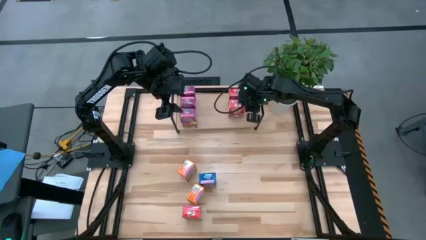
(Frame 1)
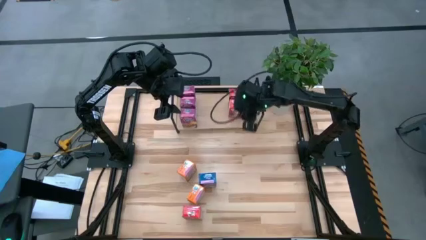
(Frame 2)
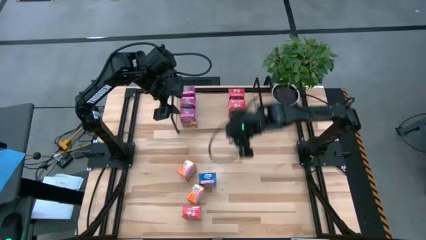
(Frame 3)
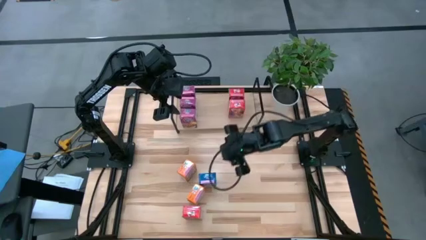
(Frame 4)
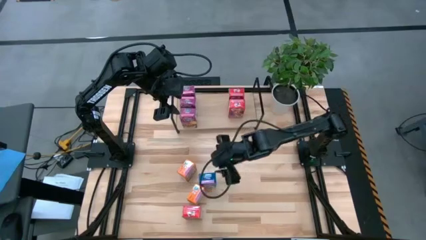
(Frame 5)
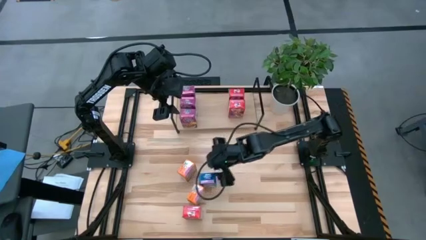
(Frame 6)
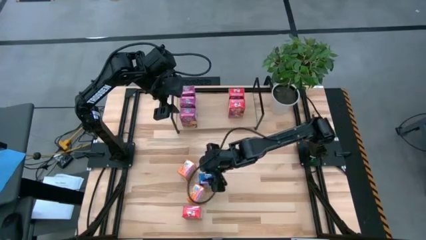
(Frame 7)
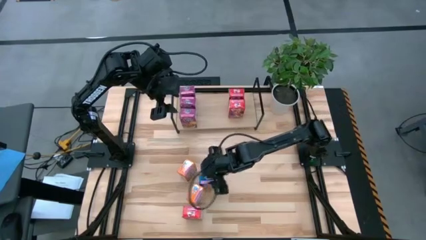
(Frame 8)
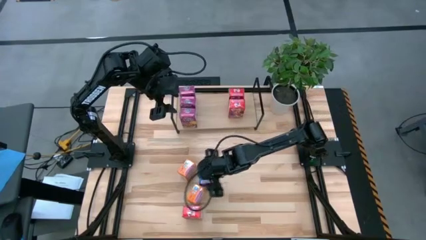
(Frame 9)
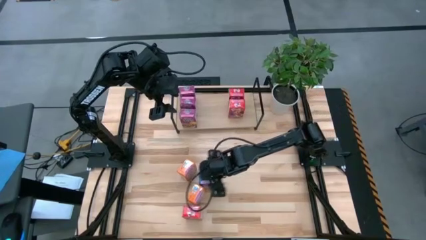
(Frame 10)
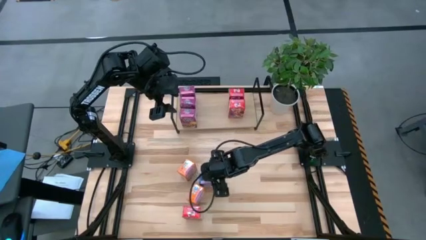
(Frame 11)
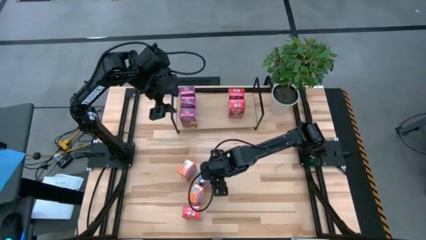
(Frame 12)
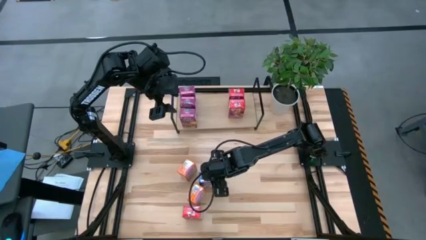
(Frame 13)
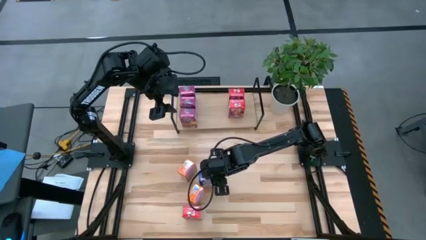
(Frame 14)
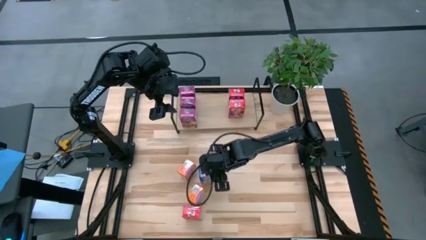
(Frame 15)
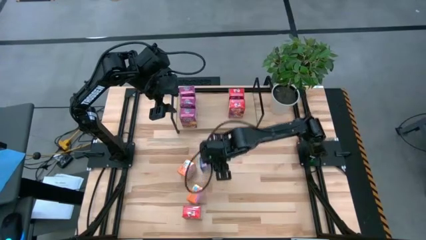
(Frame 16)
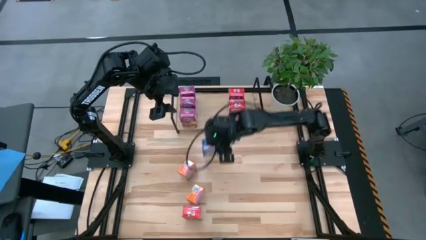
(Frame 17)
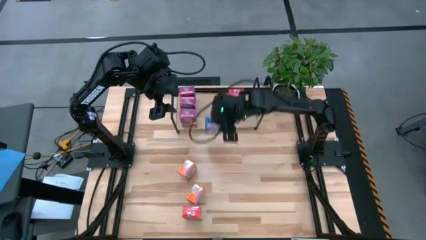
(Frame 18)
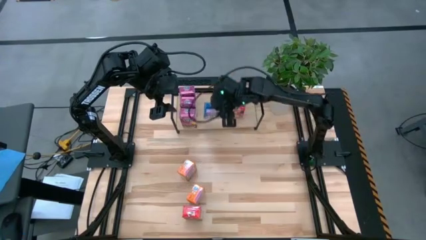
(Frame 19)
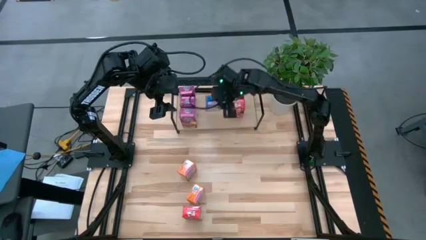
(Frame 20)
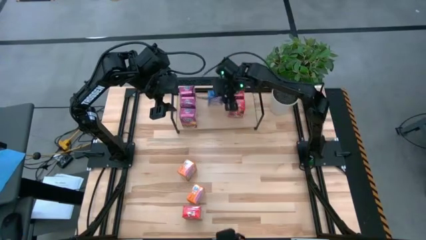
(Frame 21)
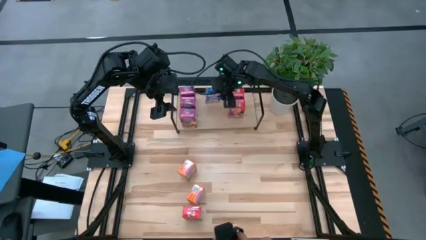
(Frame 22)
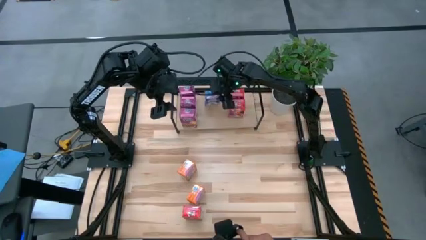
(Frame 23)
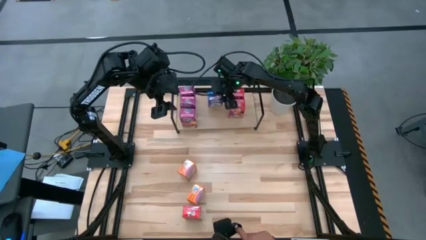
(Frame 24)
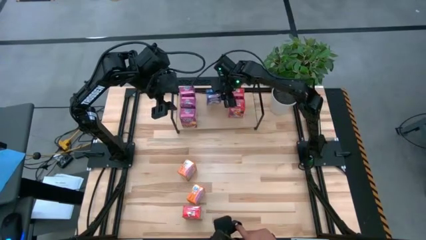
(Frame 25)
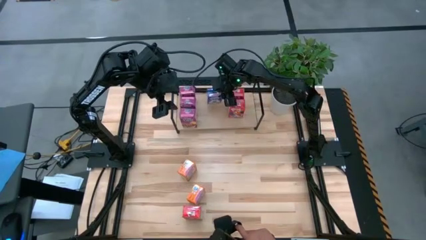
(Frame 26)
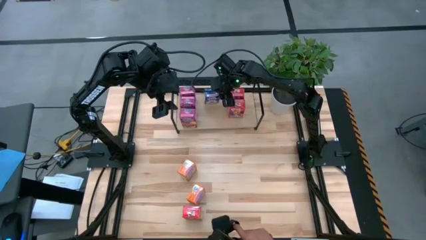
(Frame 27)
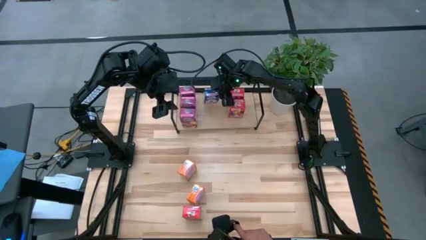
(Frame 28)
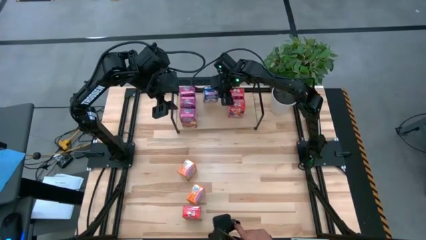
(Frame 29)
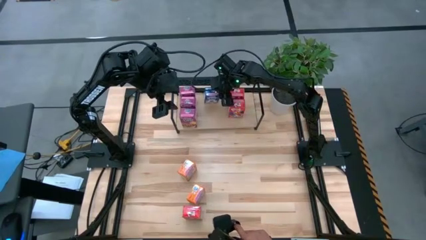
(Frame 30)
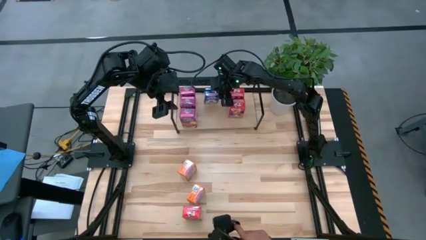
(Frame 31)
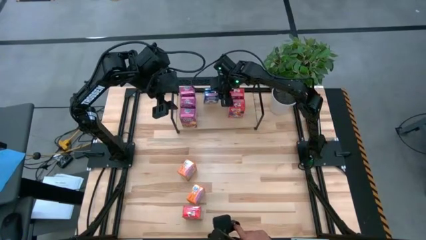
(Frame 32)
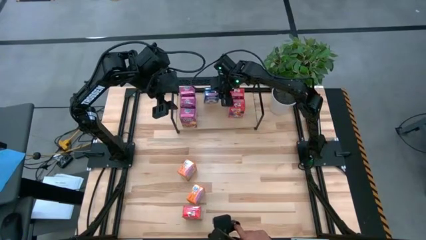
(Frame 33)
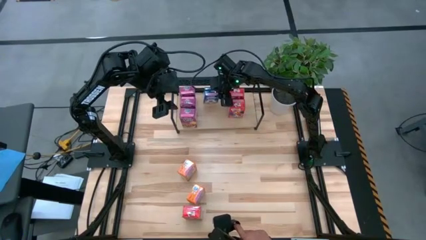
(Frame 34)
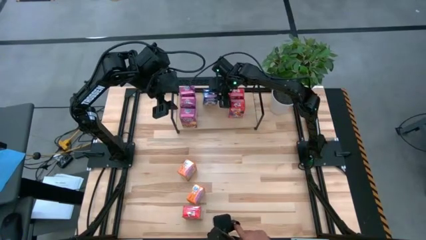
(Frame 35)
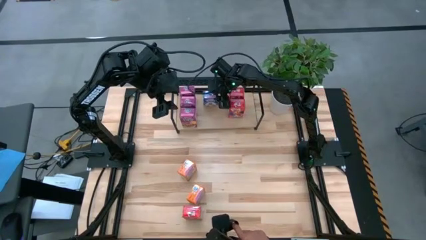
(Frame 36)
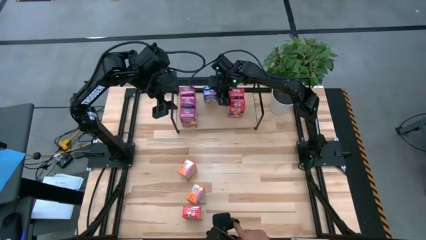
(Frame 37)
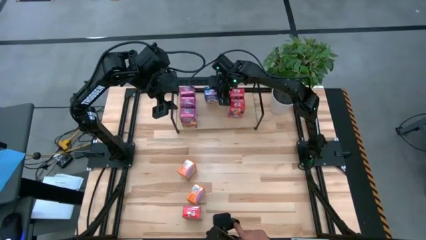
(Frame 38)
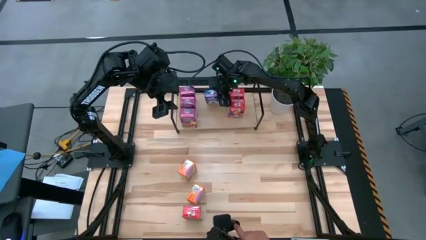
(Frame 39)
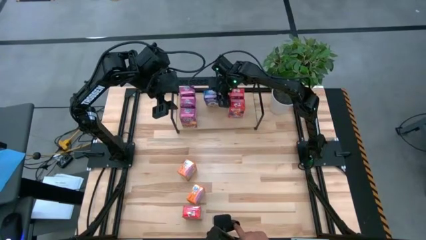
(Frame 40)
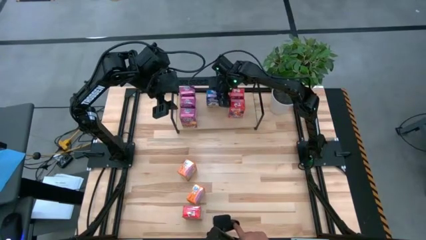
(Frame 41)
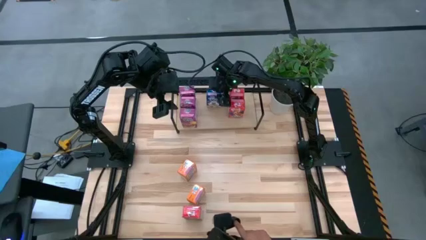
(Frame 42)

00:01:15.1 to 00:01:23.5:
Task: Stack cereal on shelf
Put the blue cereal box on the shelf

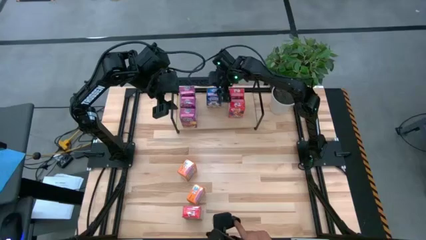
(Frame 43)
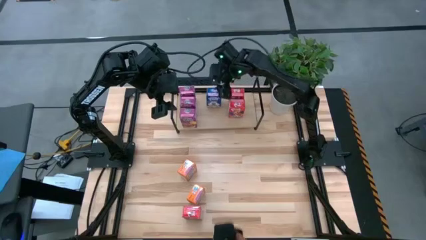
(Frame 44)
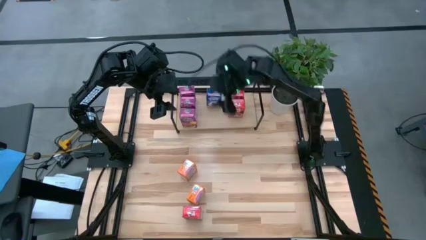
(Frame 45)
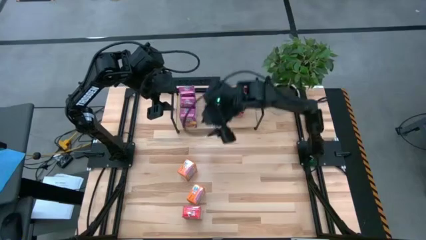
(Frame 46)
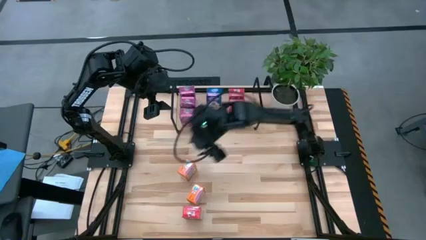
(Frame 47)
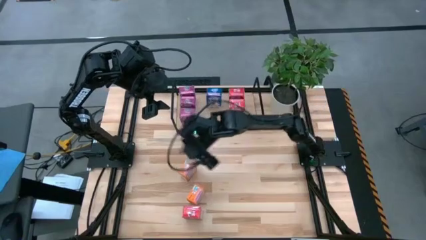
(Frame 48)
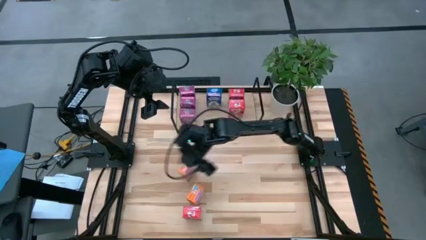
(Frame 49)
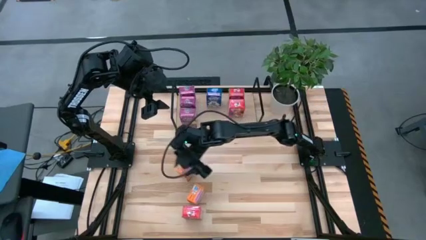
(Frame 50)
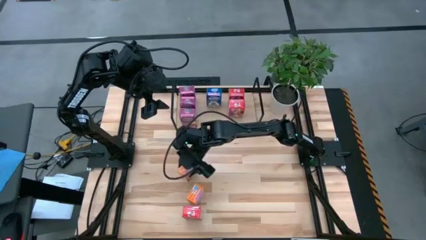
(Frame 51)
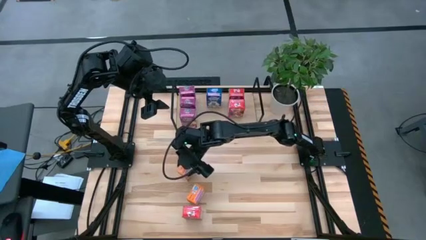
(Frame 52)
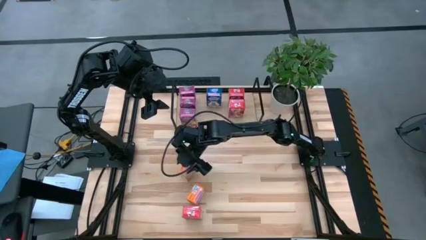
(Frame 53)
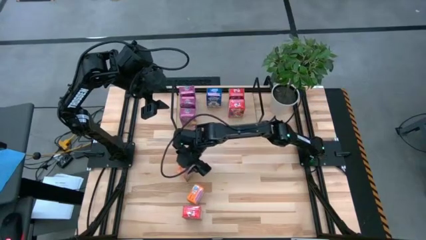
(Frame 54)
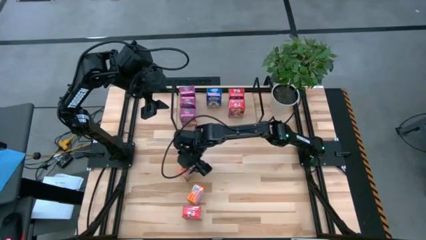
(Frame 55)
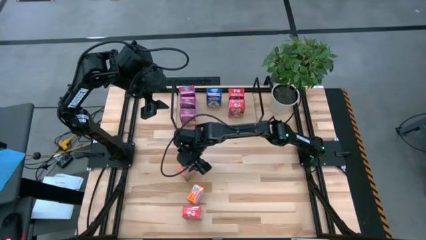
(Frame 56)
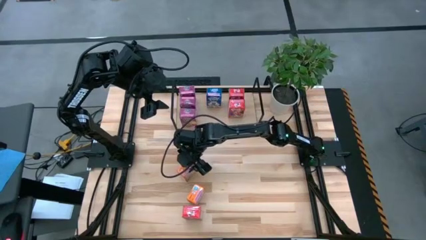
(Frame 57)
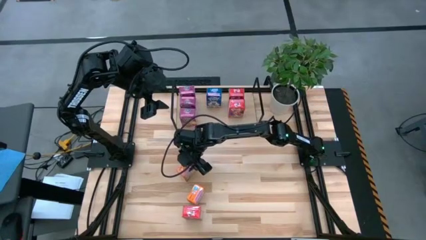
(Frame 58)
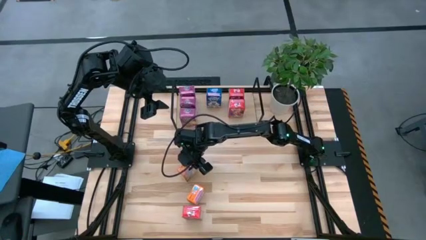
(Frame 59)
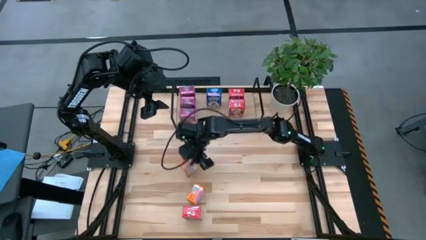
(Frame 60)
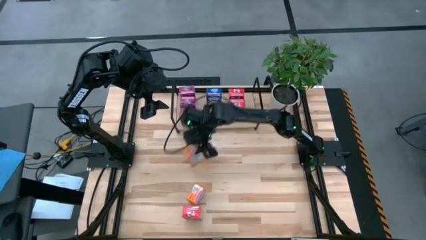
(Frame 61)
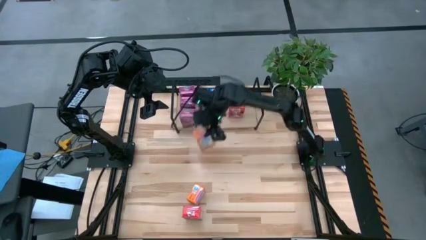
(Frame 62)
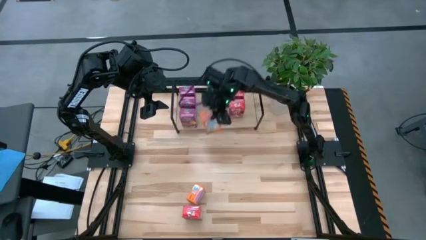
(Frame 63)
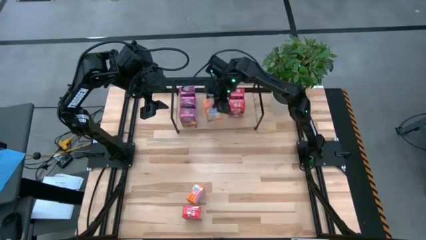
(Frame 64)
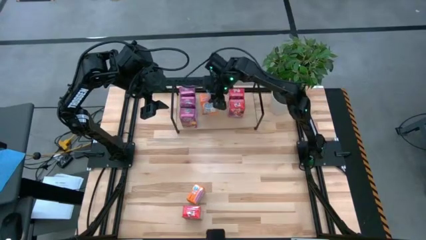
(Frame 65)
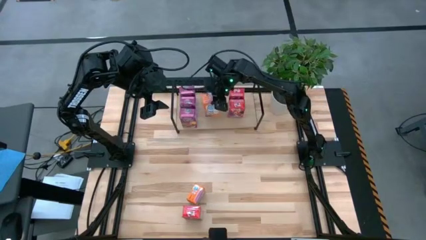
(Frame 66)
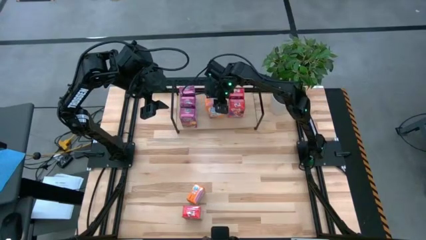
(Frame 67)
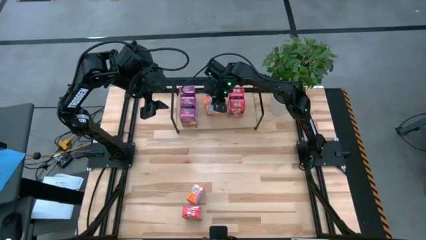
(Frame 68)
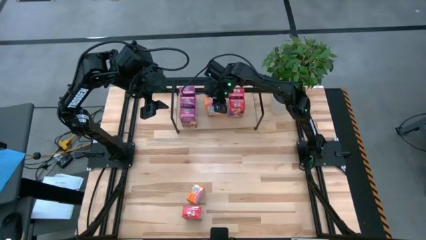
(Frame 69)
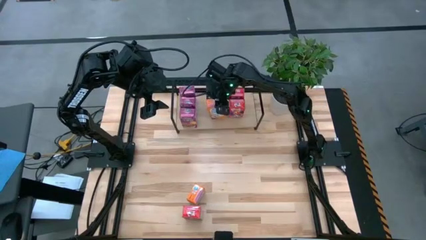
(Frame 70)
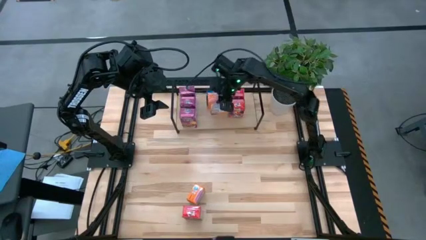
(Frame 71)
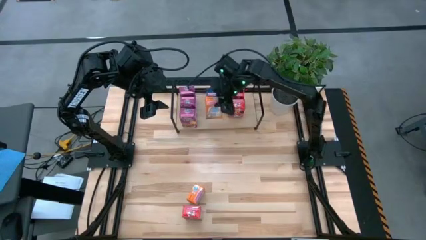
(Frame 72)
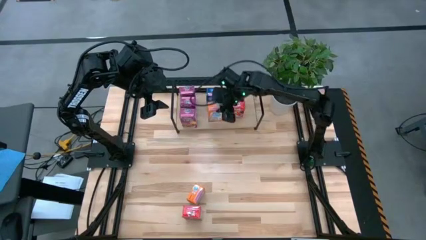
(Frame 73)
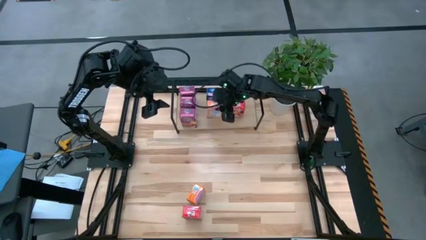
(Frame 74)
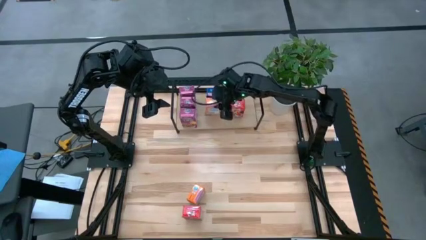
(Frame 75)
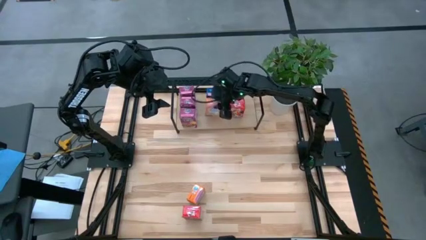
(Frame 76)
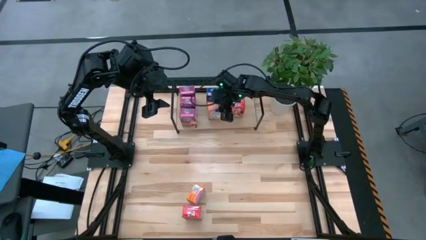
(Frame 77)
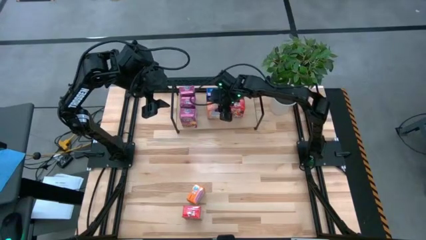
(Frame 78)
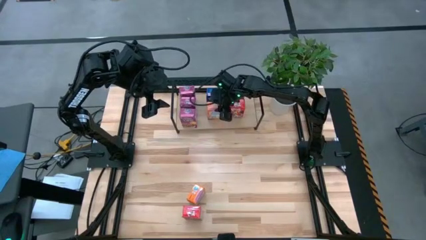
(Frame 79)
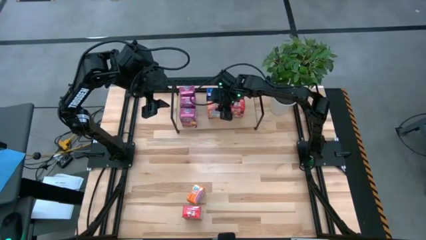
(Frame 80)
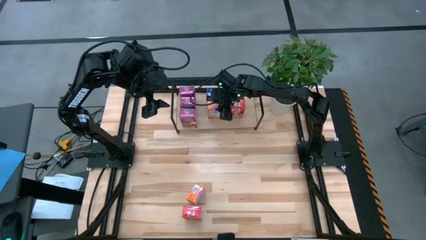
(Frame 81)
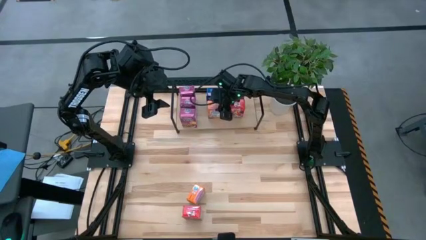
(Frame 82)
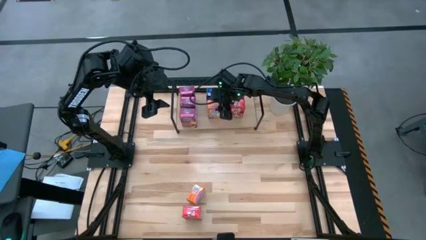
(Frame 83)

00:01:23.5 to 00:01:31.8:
Put the top orange cereal box on the shelf
